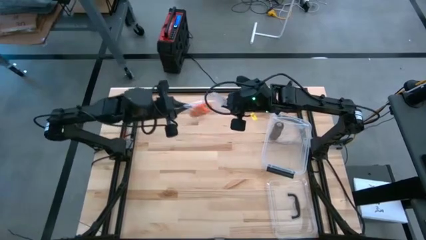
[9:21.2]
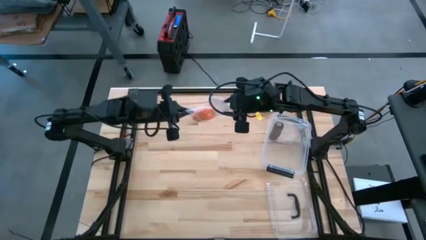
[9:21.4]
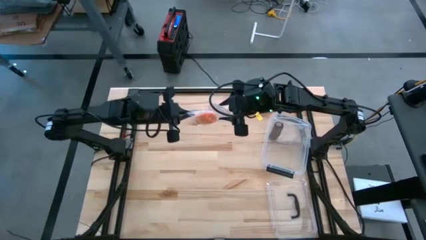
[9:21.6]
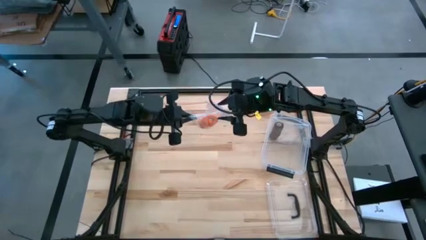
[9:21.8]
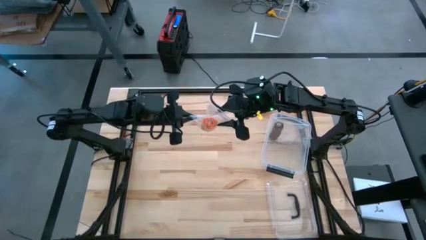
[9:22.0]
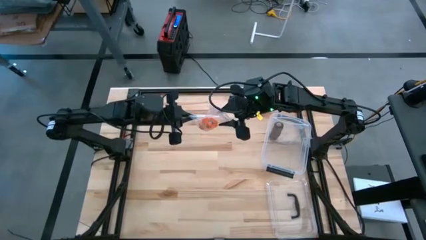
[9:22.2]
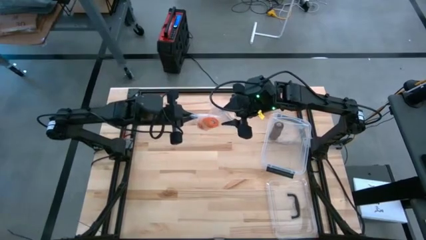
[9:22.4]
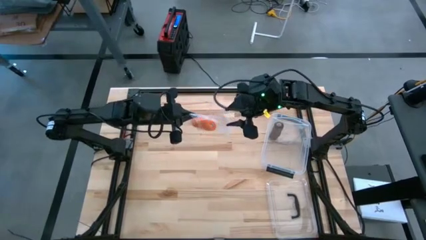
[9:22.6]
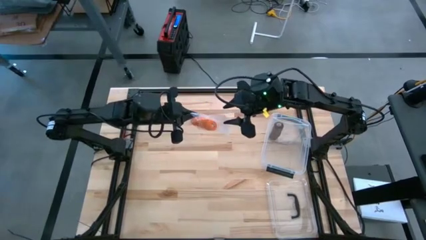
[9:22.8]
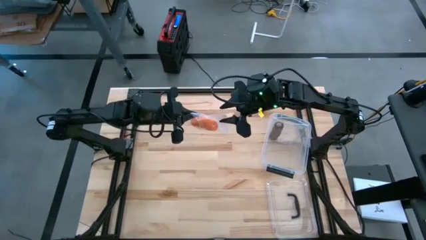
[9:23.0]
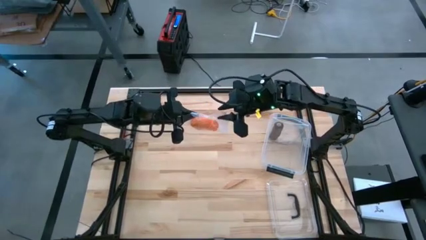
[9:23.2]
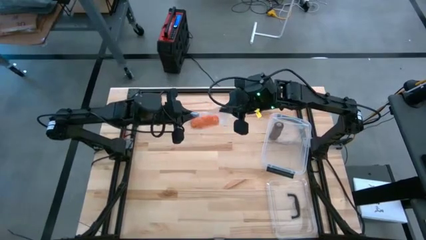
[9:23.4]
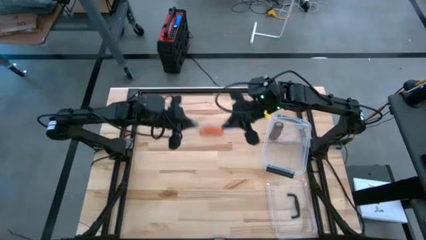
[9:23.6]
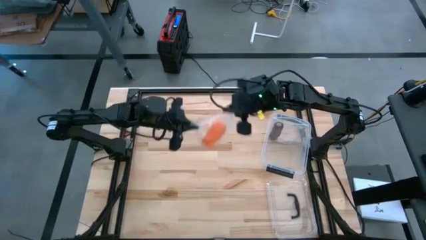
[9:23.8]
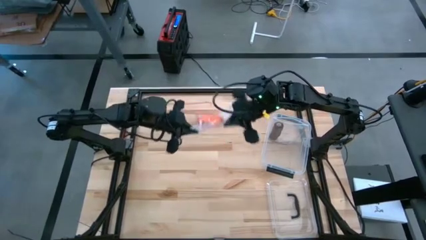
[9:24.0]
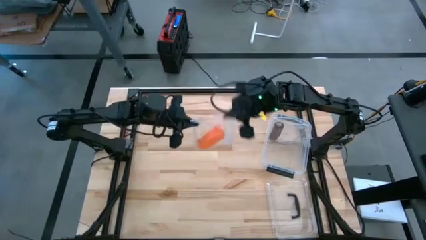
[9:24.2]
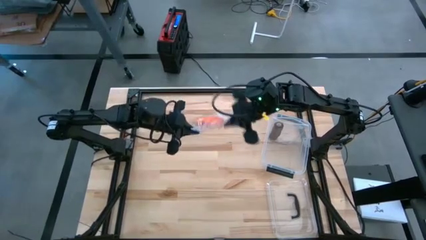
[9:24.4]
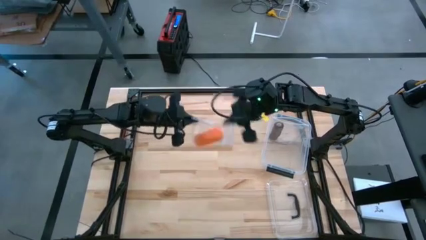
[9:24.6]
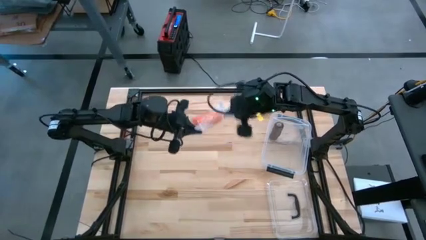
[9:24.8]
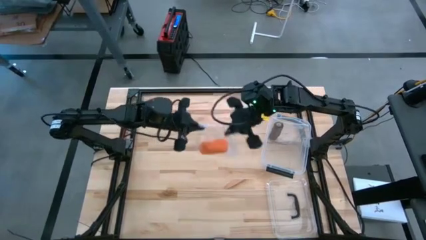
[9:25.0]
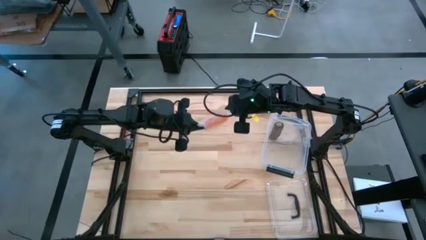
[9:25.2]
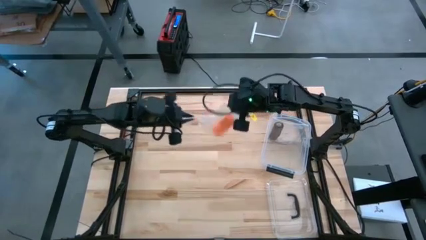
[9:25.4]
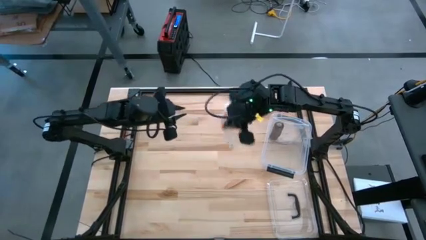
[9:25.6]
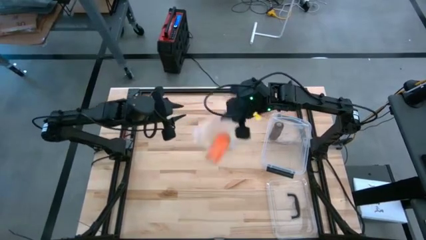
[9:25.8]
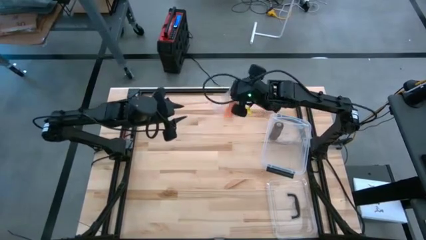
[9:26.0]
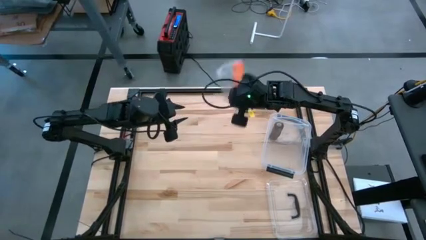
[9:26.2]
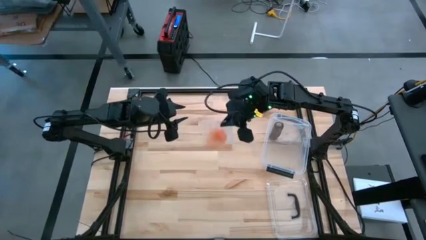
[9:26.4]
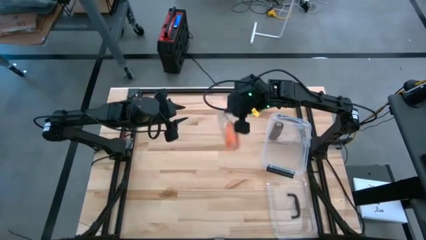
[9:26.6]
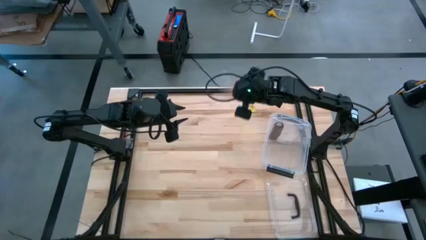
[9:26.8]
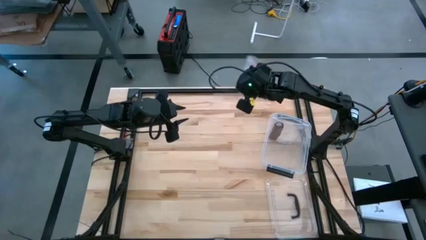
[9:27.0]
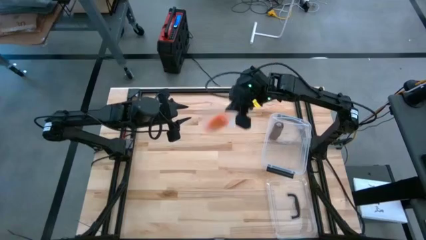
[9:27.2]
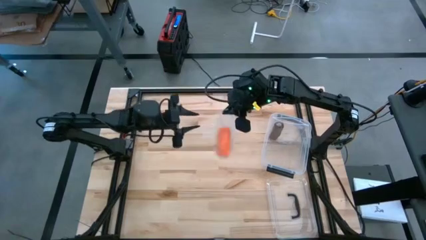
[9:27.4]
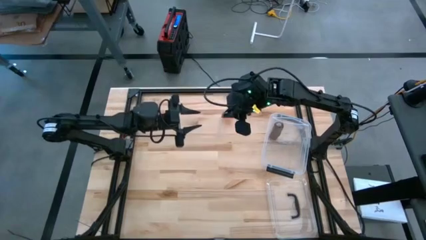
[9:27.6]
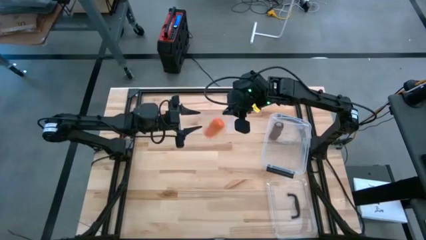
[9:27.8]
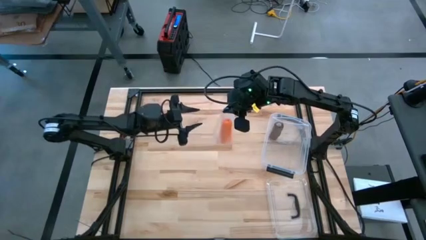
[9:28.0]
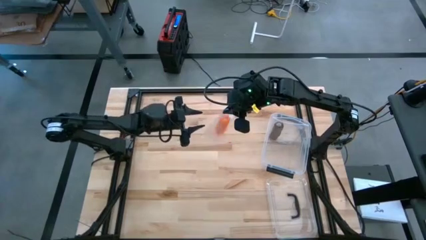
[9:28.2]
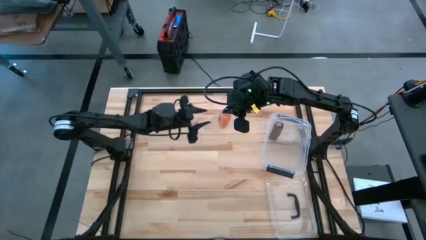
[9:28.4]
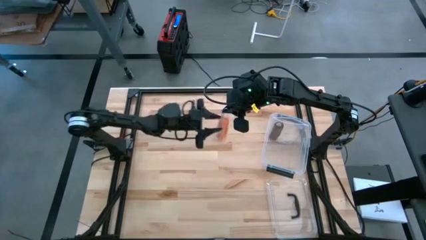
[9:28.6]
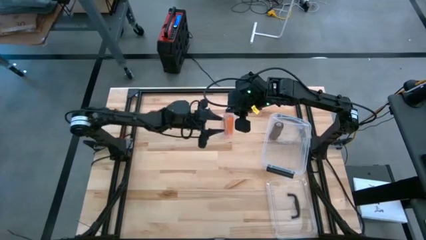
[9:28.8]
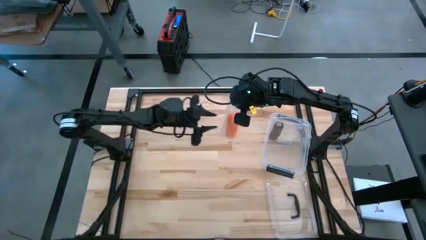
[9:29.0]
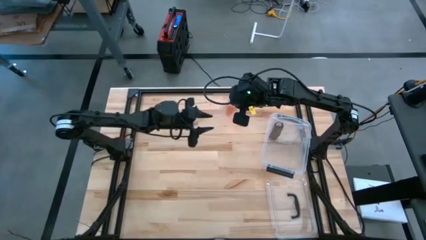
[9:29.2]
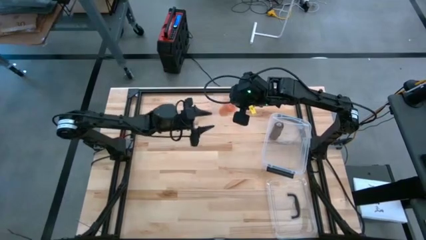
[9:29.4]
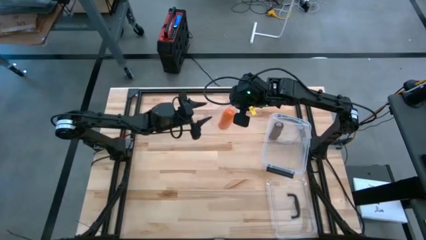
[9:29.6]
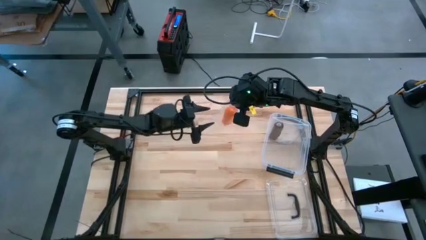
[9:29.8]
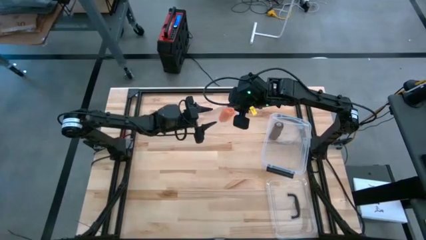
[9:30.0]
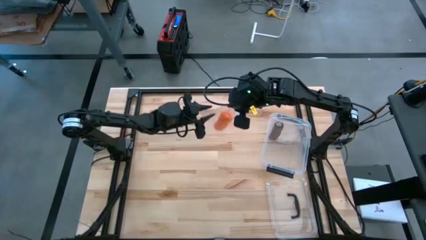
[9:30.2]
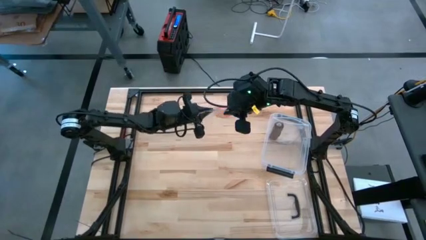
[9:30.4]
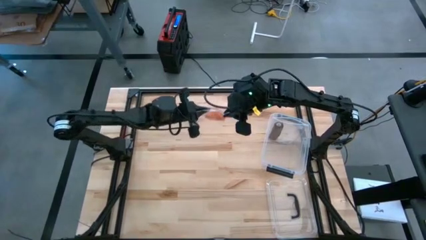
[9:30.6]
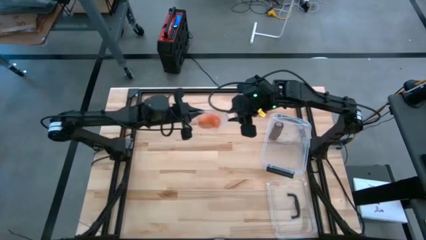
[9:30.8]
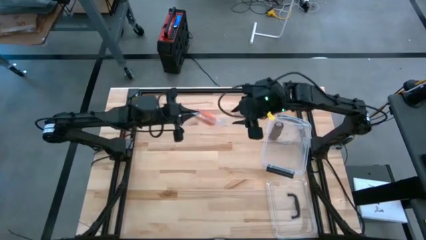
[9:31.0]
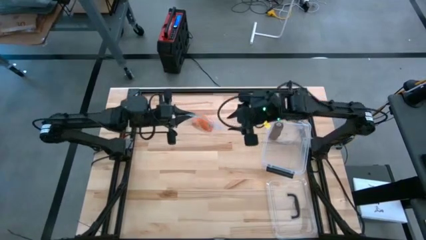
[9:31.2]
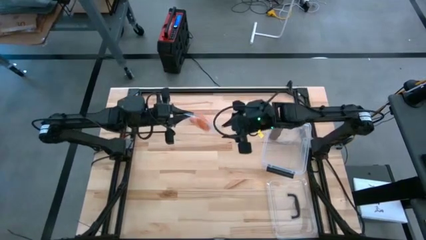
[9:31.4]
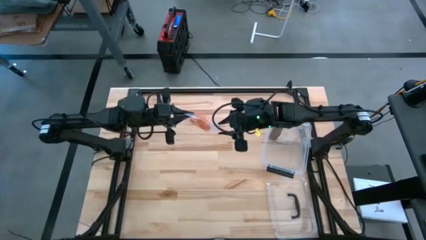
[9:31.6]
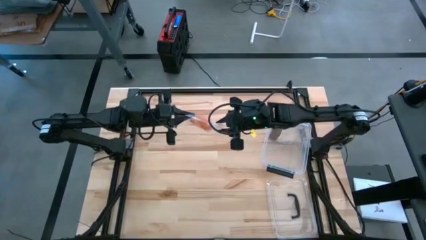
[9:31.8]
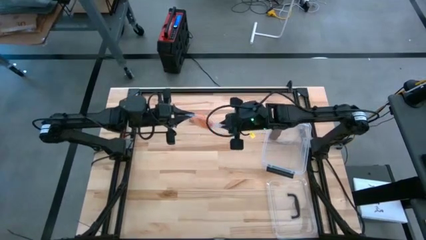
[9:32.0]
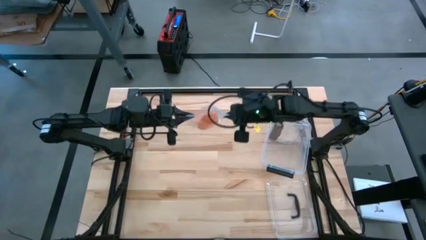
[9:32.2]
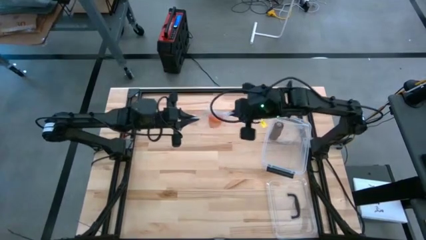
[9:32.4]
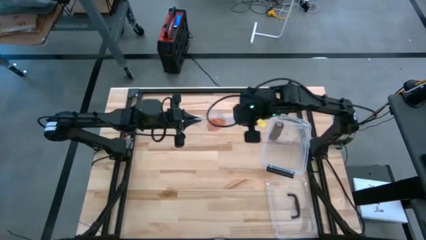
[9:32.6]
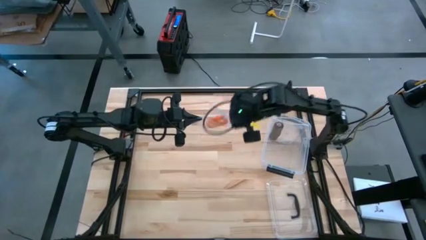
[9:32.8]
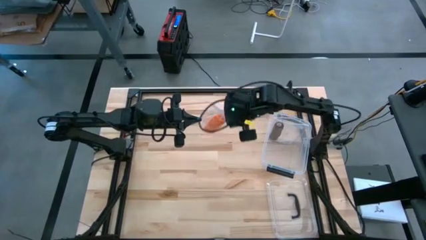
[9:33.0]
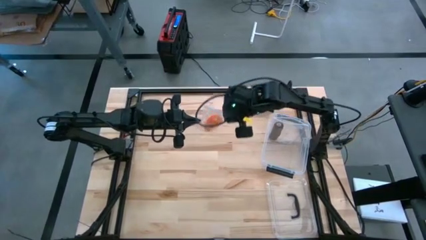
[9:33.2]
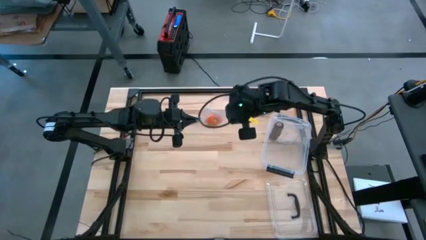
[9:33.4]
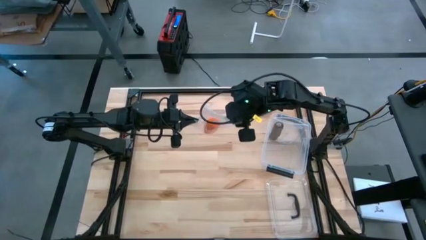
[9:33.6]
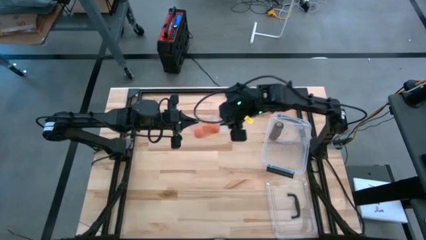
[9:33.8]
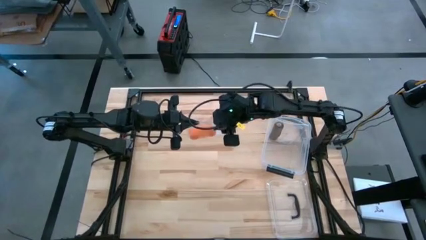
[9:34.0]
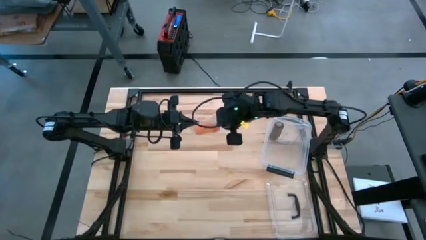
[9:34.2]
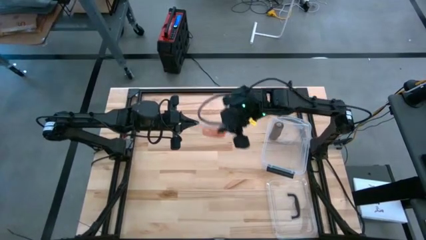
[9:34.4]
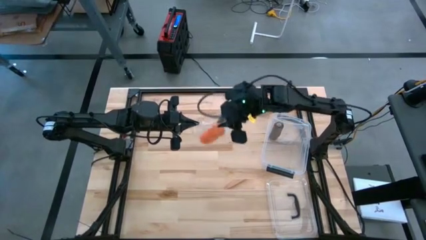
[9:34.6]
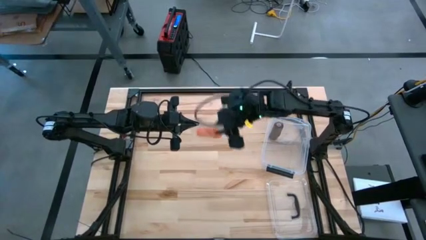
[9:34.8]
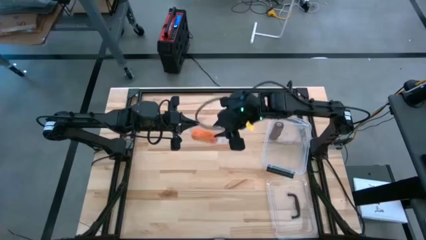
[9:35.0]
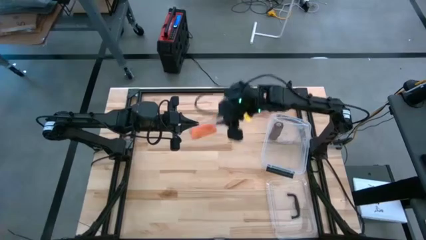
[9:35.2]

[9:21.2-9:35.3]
Task: Roll bandage
Put the rolled orange bandage into the transparent zip bag
